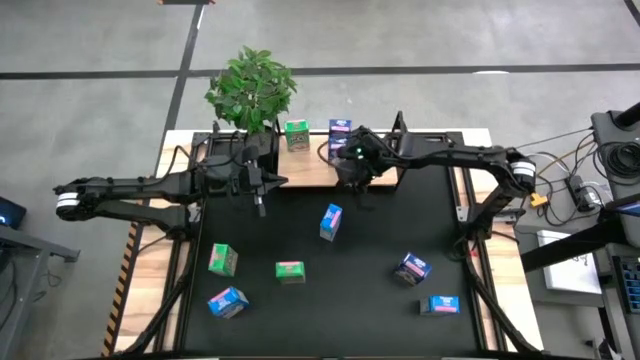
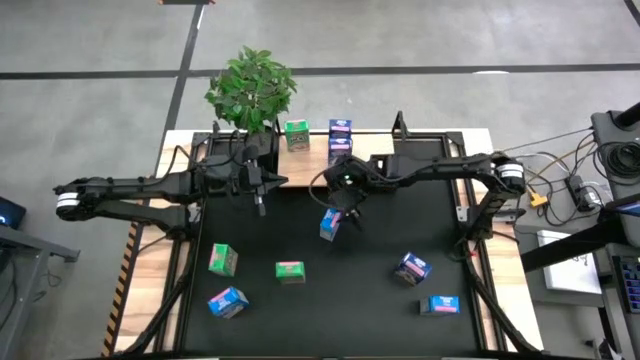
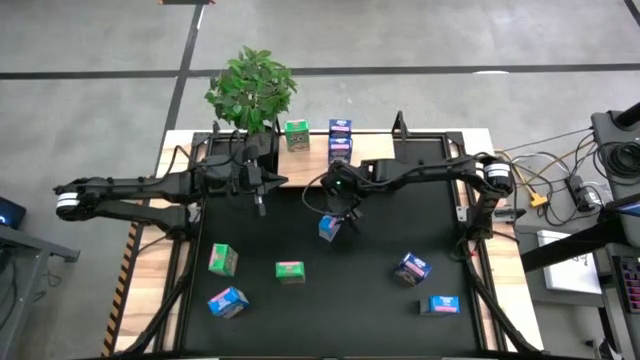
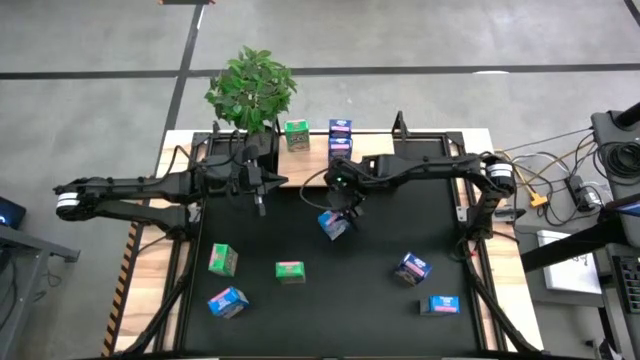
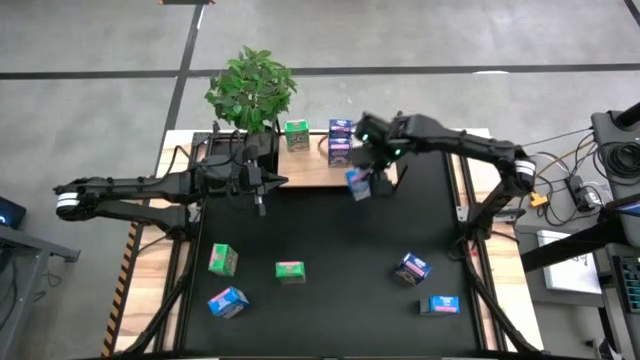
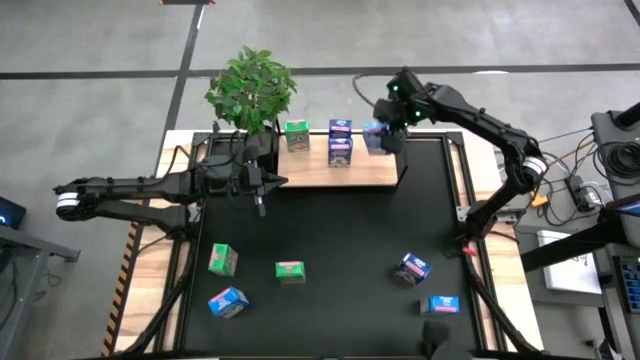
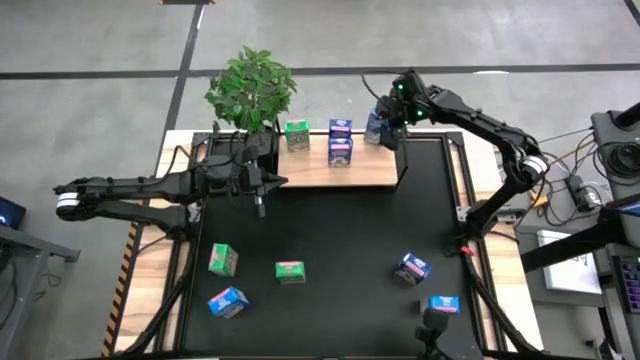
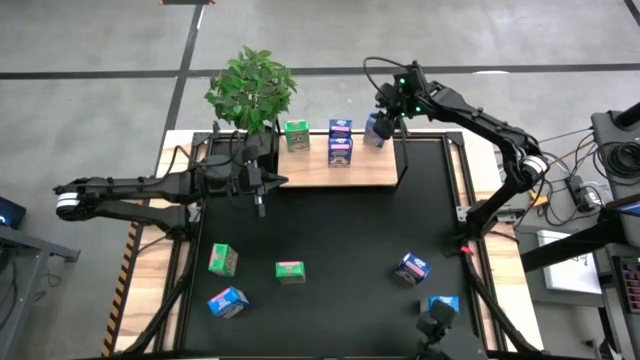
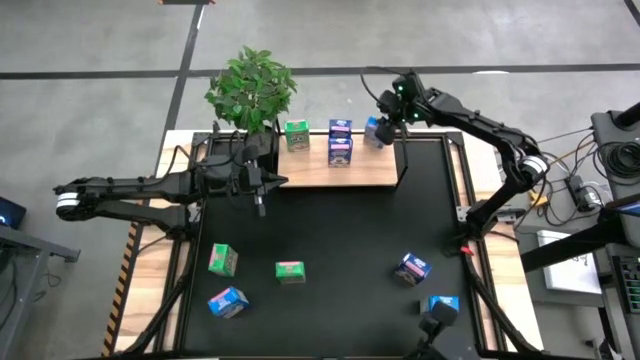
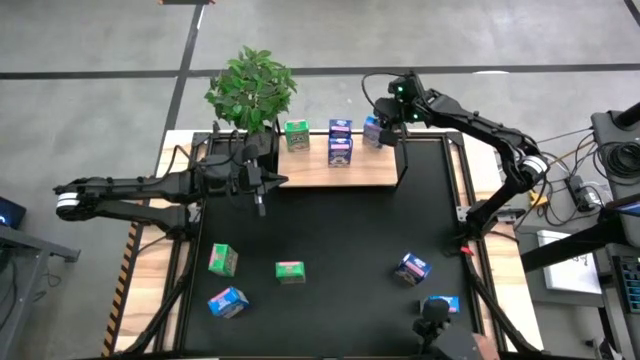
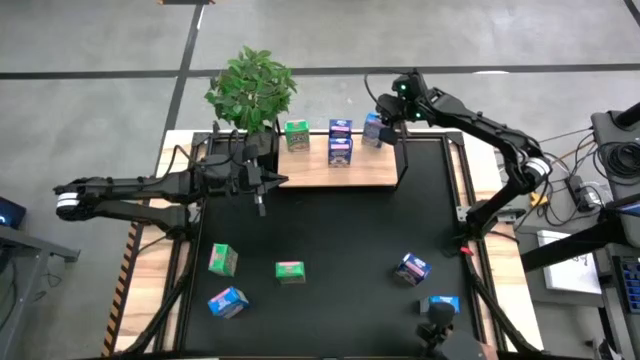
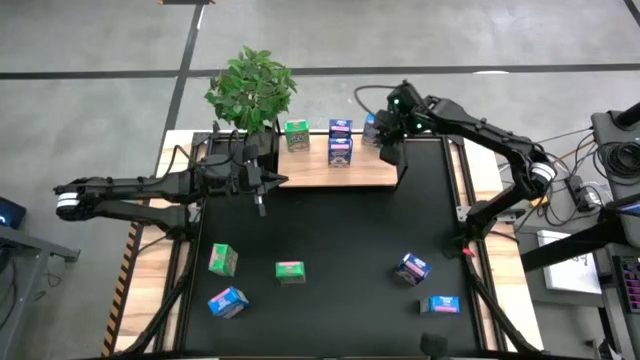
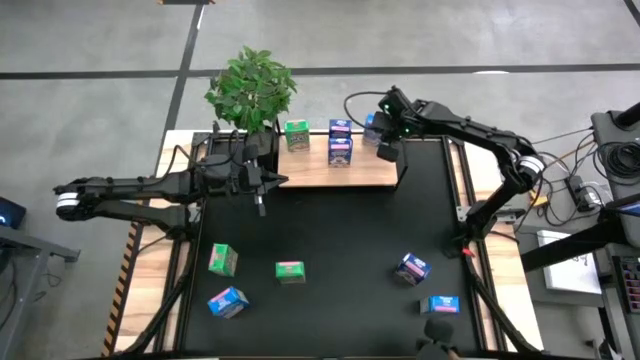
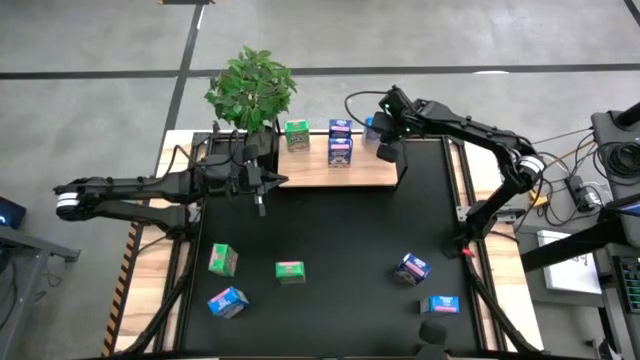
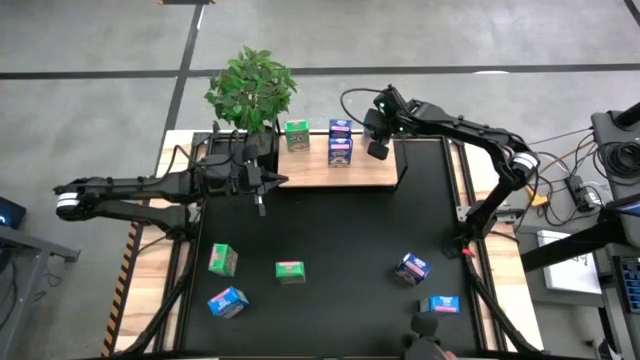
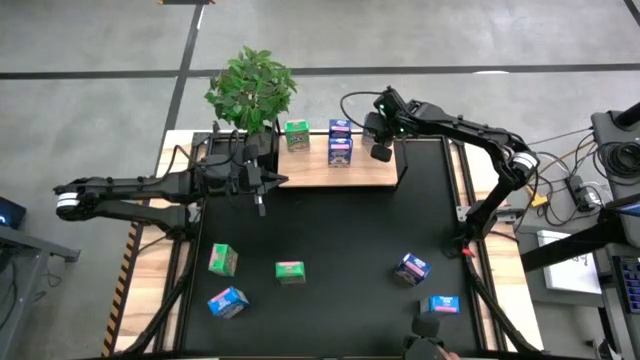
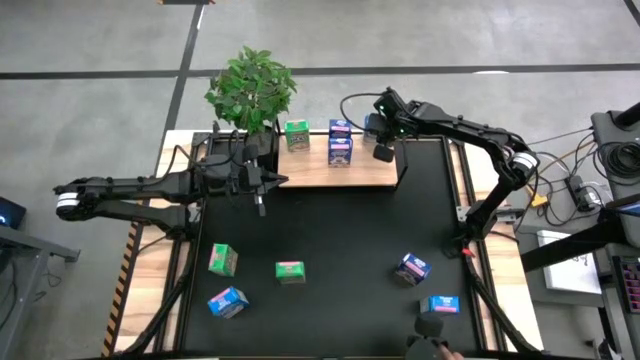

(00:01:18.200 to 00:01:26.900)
Task: Stack cereal on shelf
Put the top light blue cereal box on the shelf

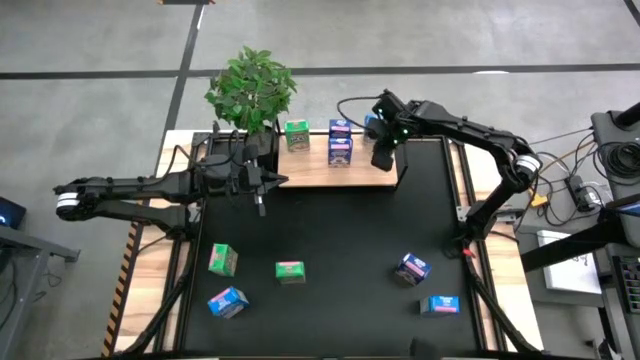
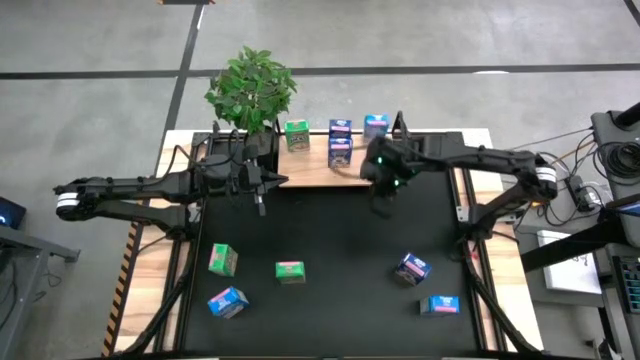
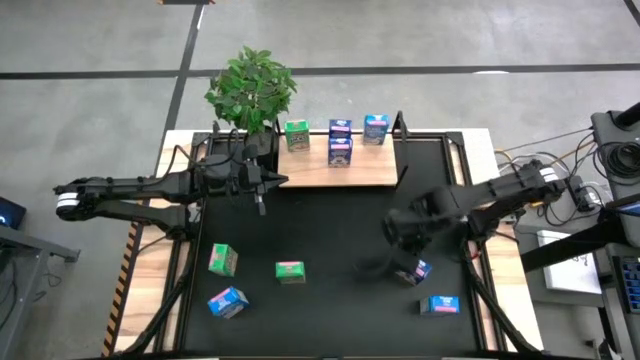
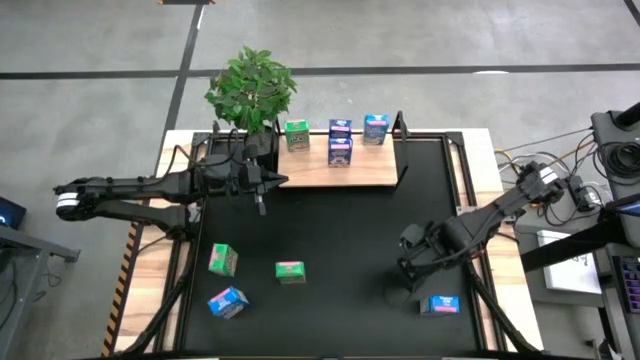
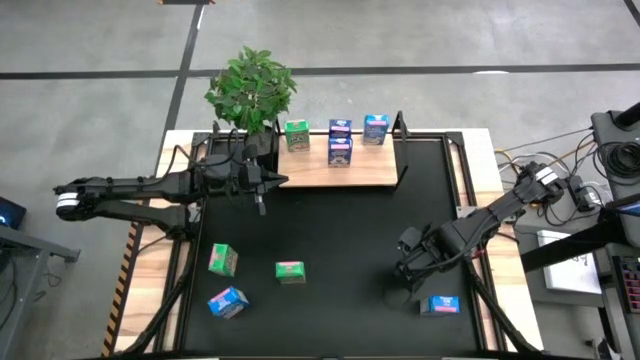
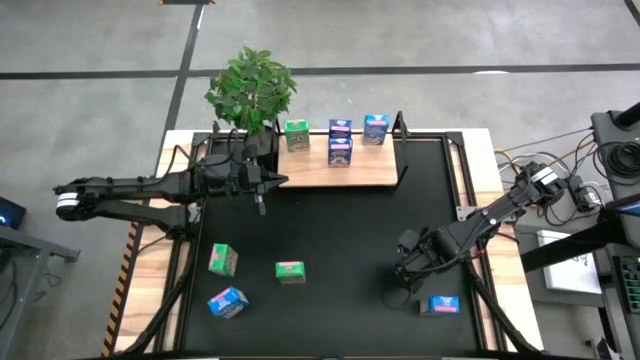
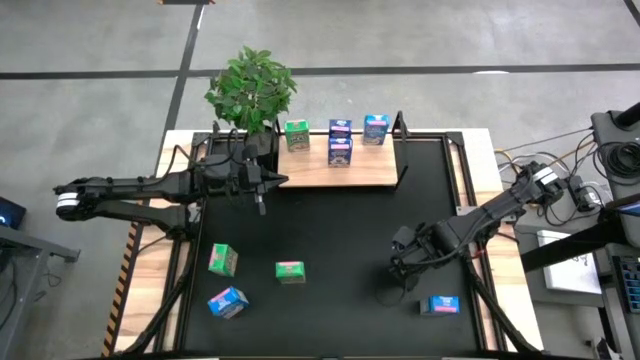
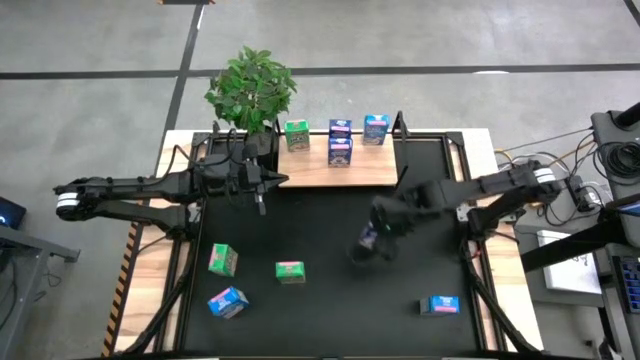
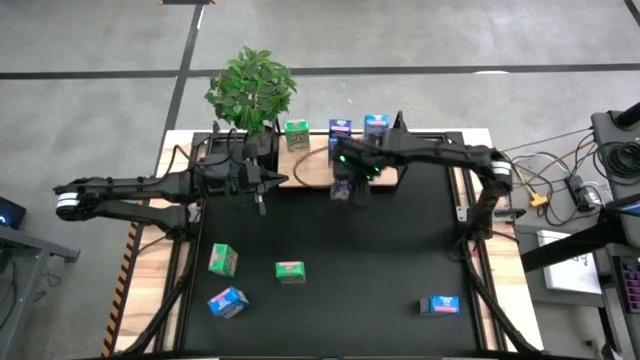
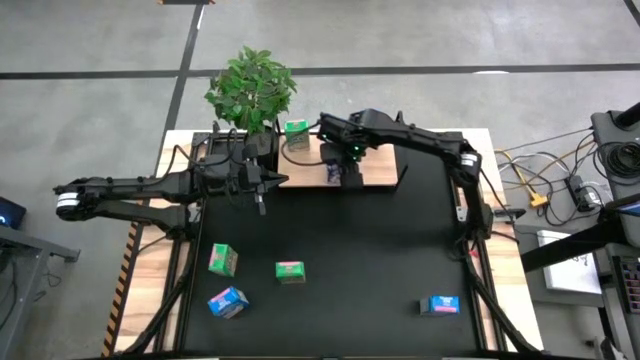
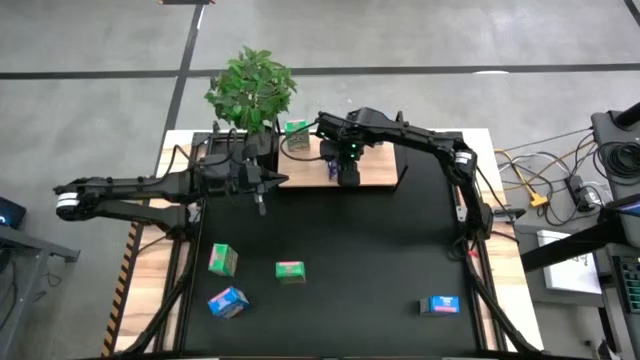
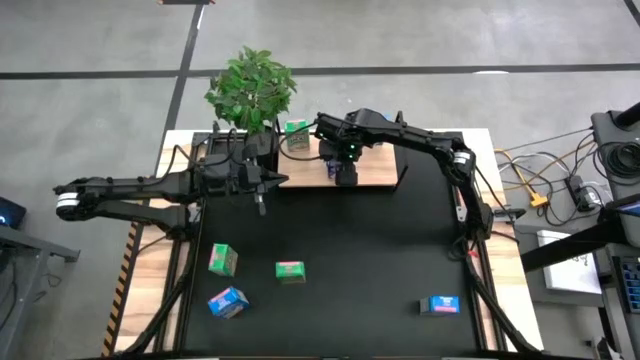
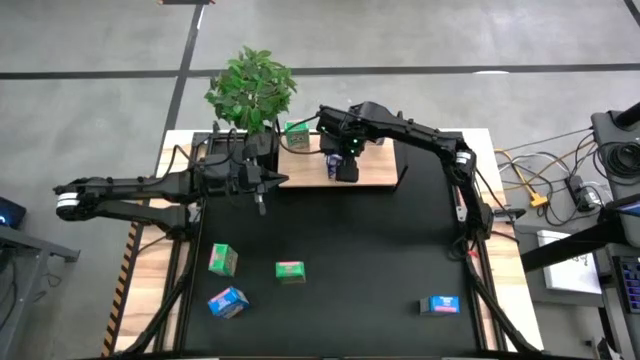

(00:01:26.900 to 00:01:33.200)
Put the blue cereal box aligned with the blue cereal boxes on the shelf

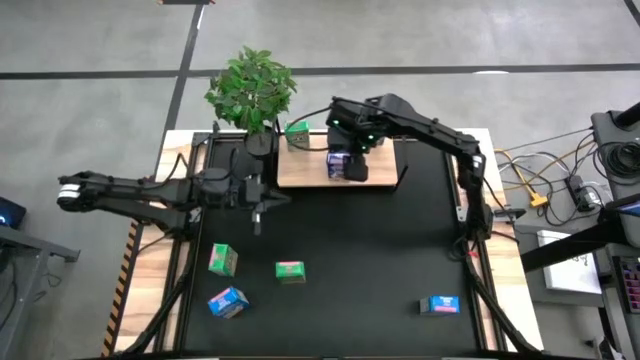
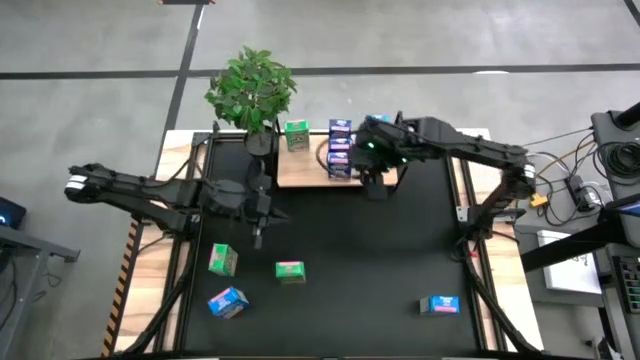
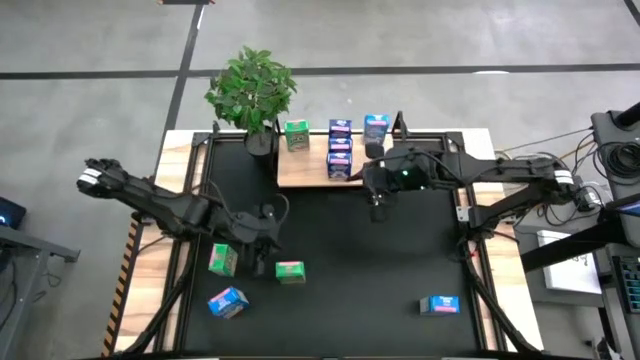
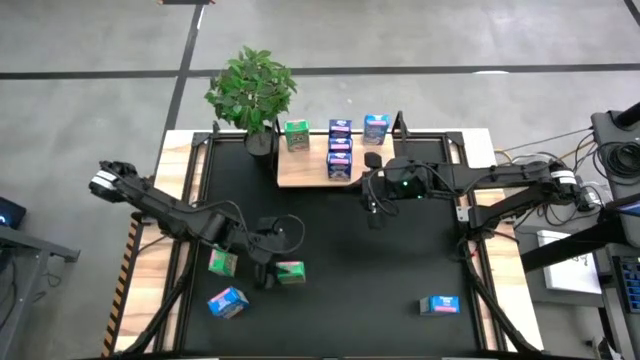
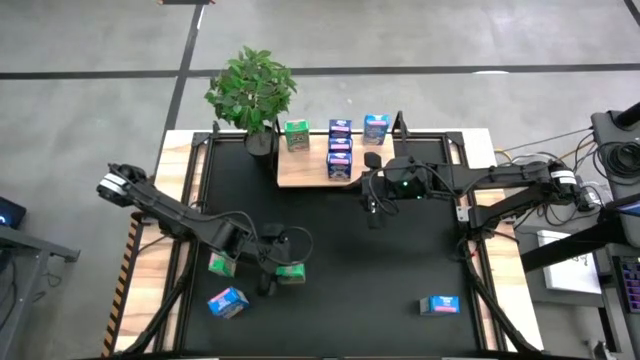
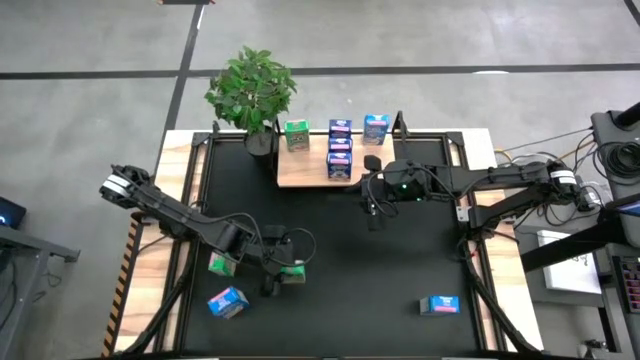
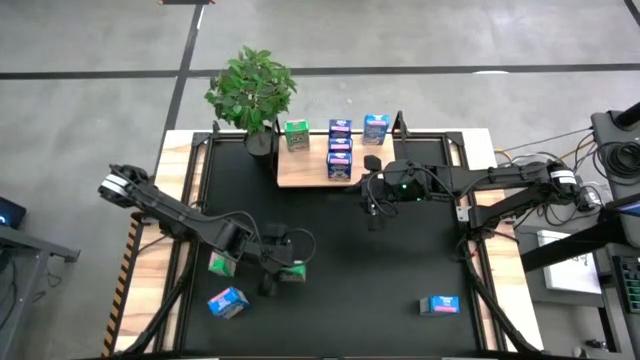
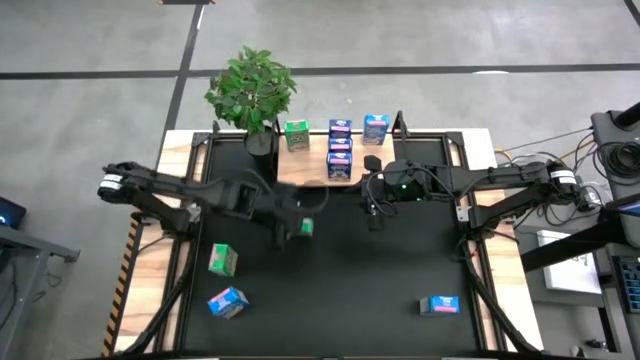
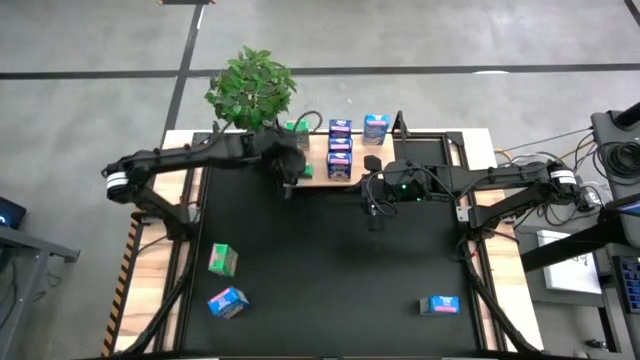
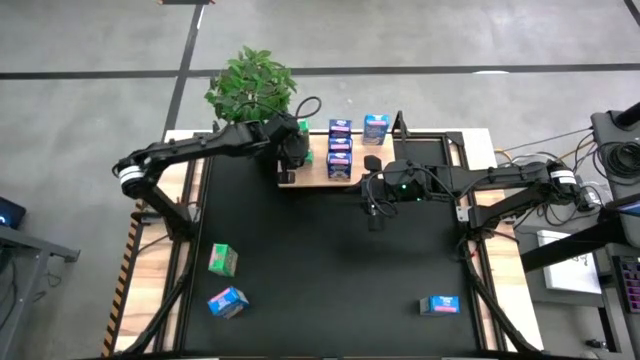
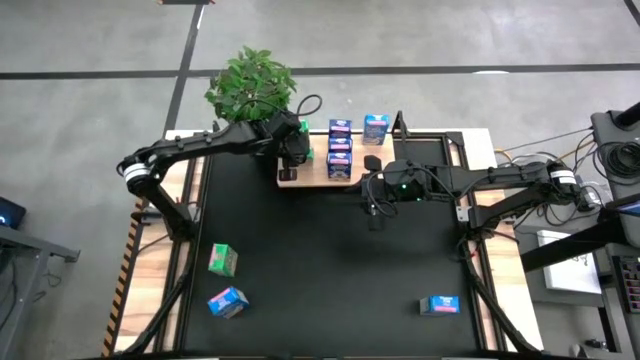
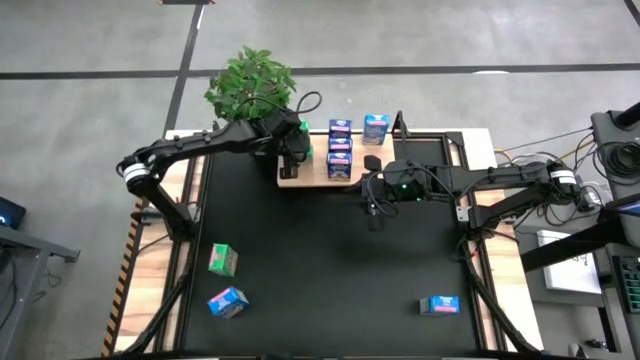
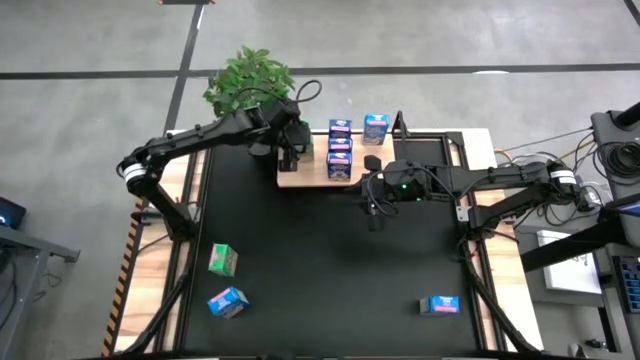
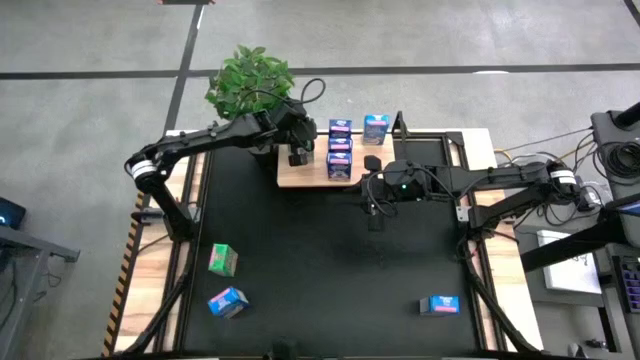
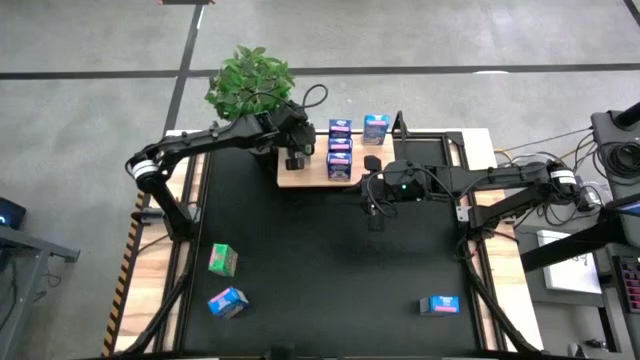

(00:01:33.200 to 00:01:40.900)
Put the right green cereal box aligned with the green cereal box on the shelf
